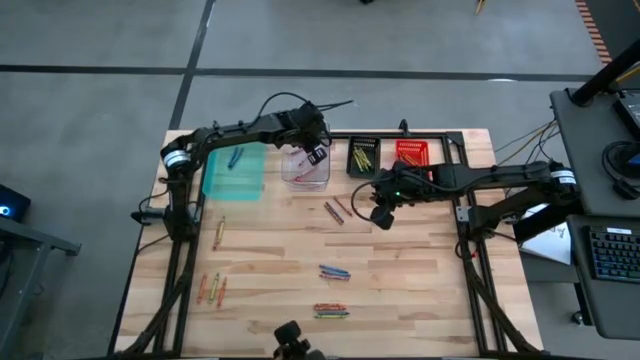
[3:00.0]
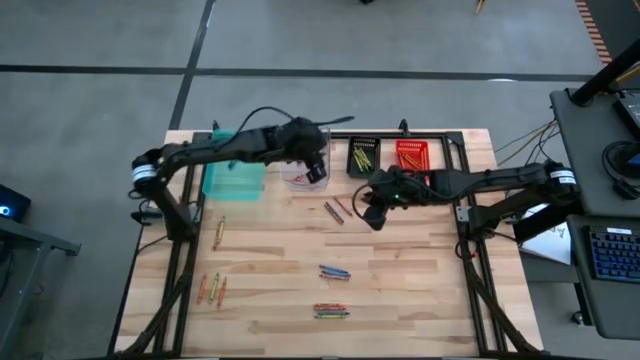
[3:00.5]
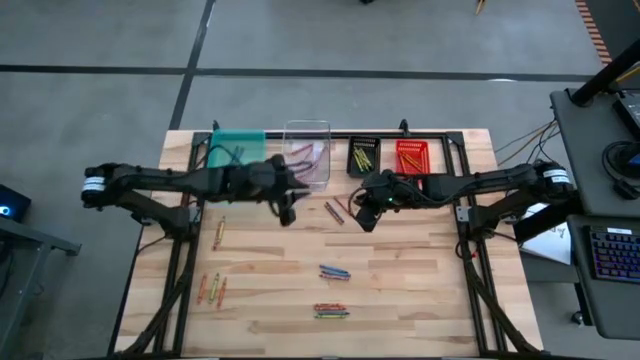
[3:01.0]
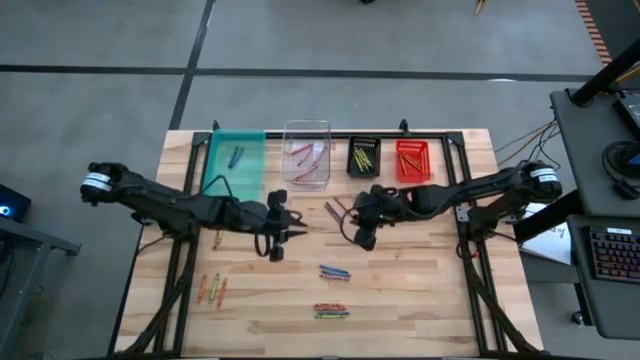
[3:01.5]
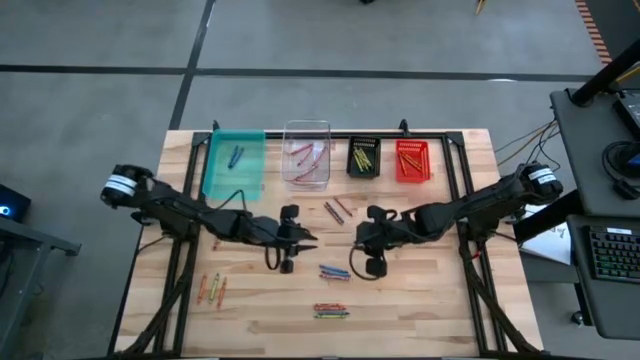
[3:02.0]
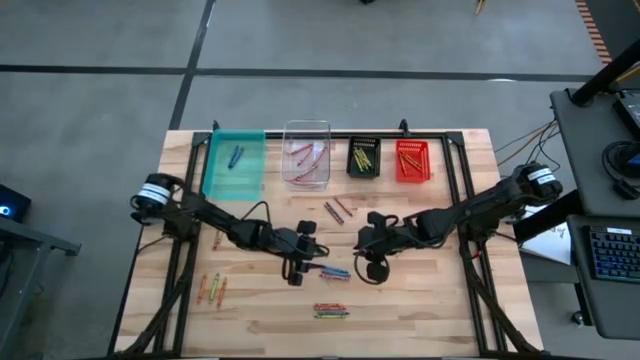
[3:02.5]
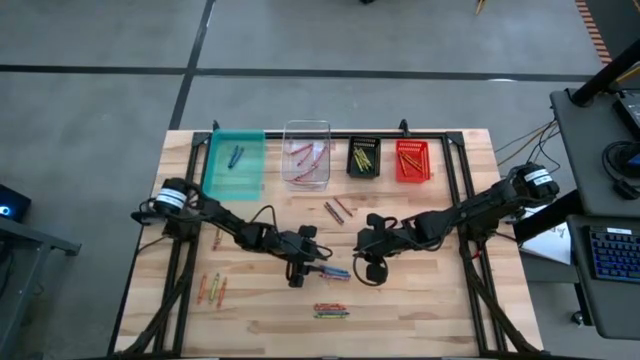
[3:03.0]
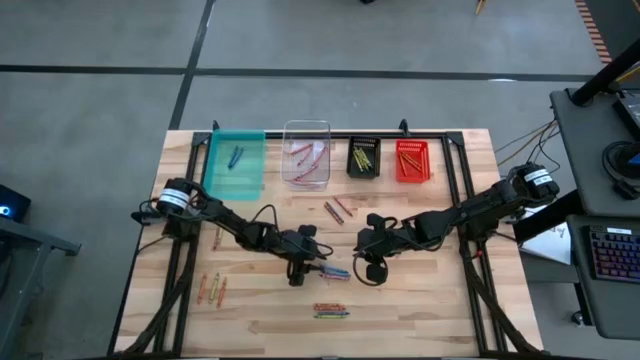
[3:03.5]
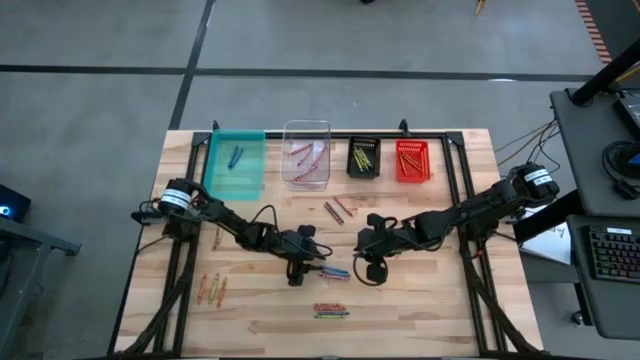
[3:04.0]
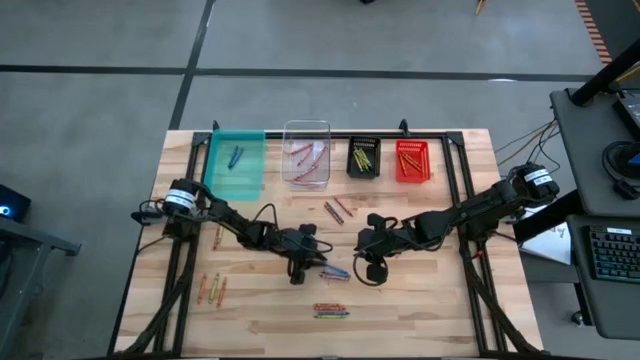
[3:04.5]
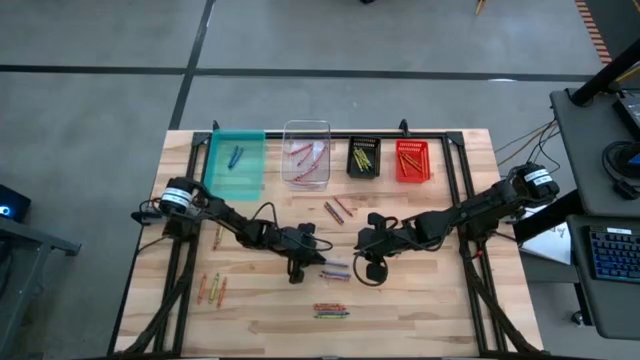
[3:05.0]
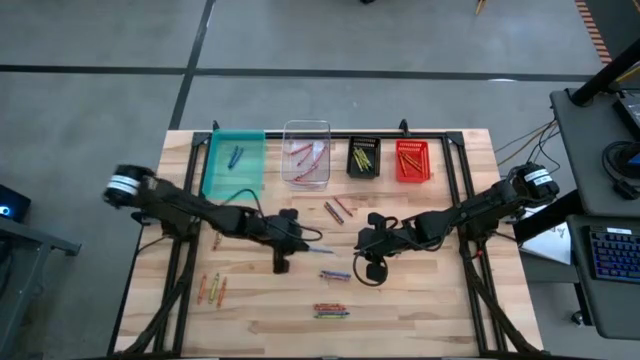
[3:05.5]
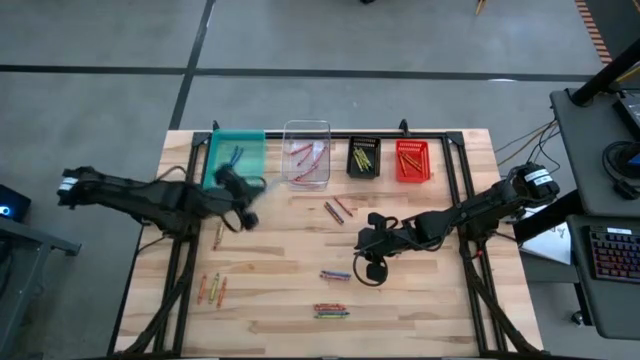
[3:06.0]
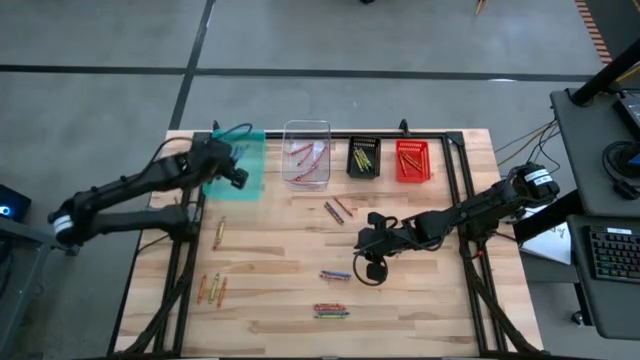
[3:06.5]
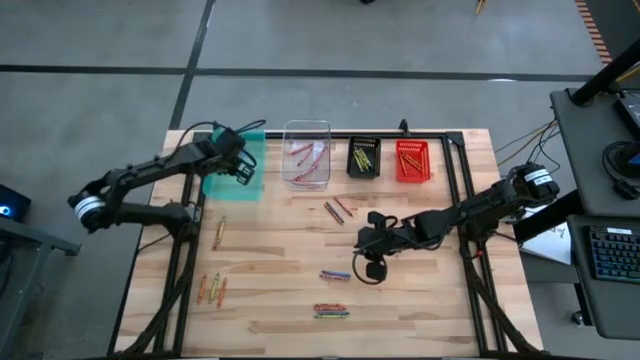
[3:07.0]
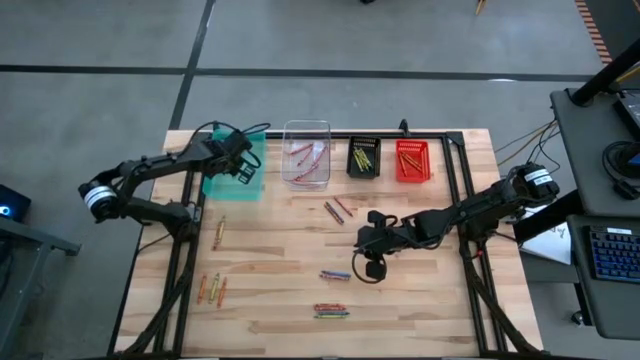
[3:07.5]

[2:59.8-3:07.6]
Task: Sort crayons
Put the blue crayon into the green transparent bin

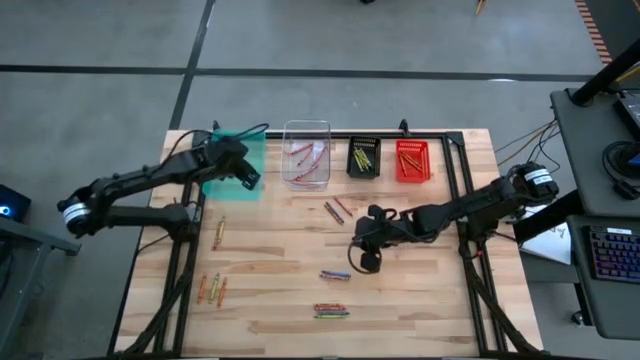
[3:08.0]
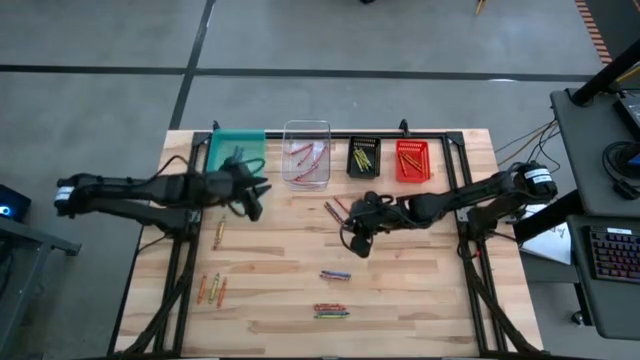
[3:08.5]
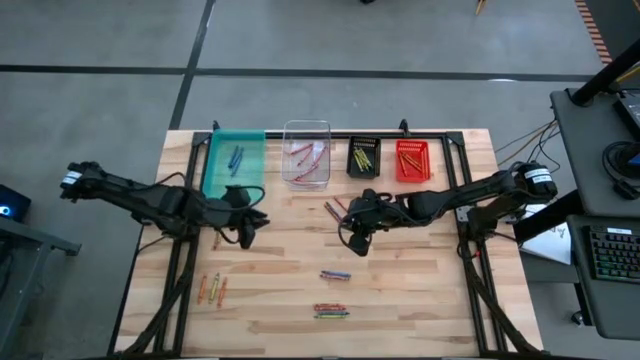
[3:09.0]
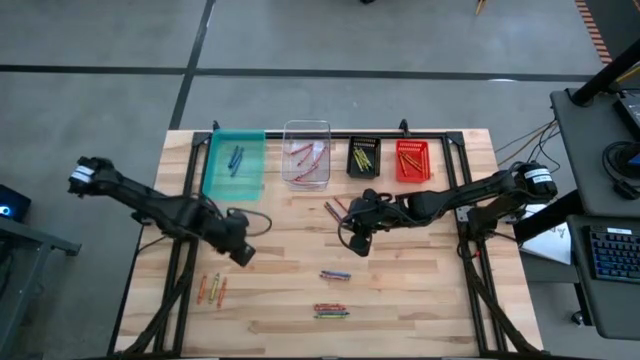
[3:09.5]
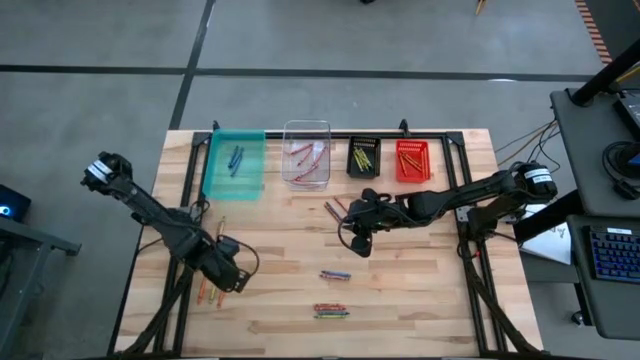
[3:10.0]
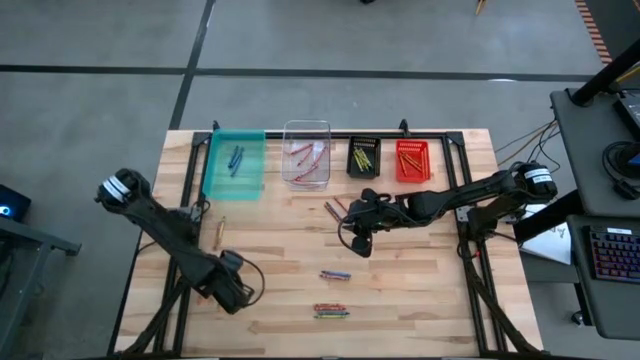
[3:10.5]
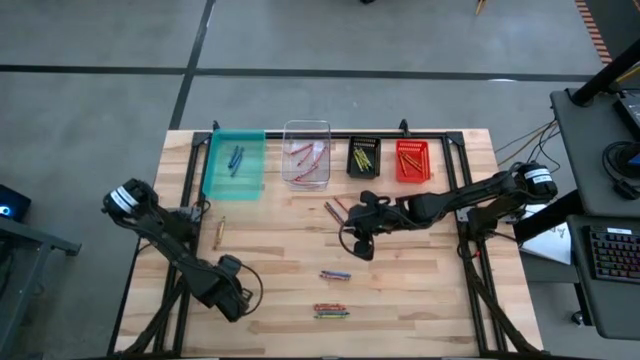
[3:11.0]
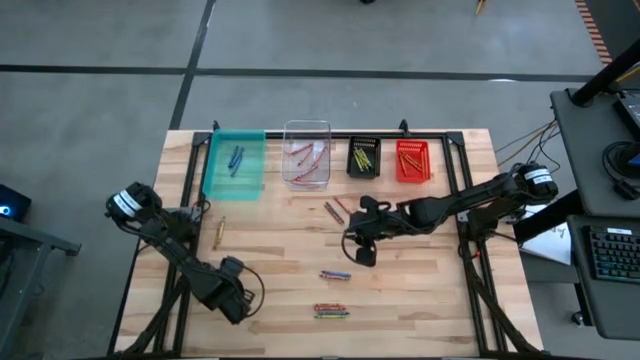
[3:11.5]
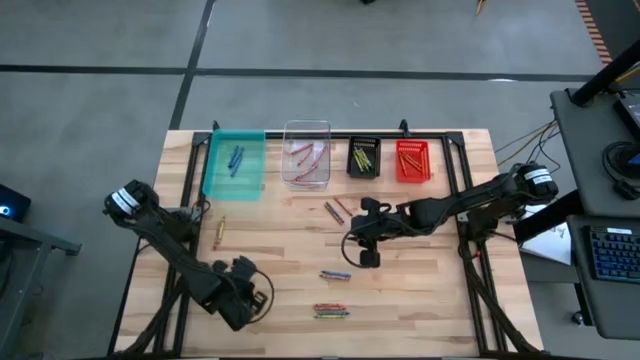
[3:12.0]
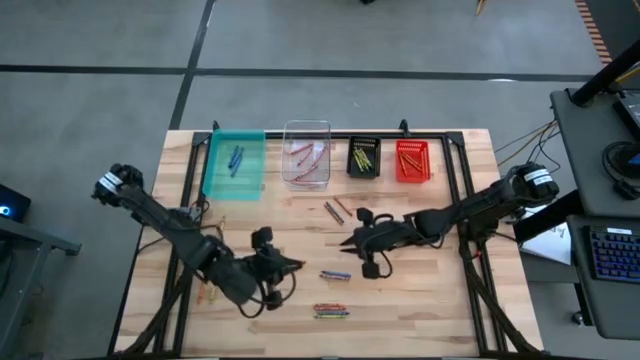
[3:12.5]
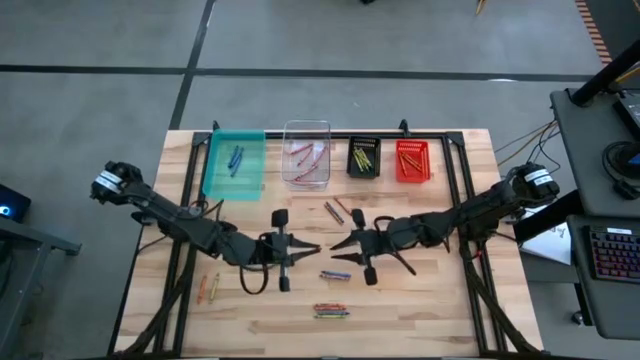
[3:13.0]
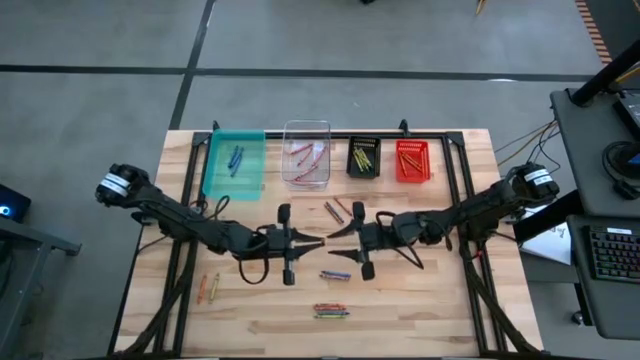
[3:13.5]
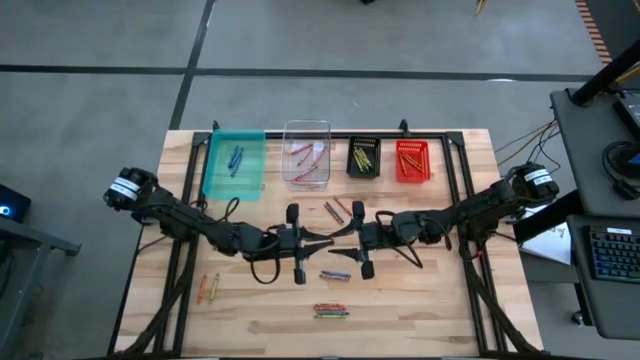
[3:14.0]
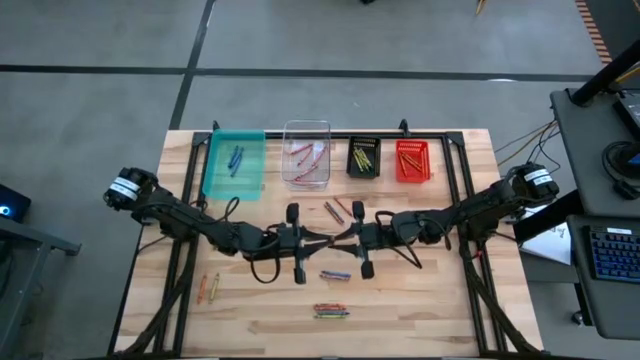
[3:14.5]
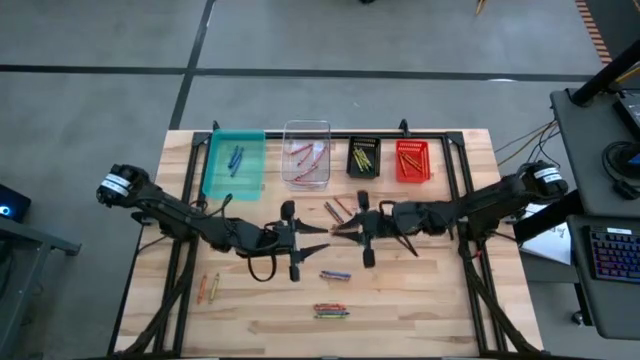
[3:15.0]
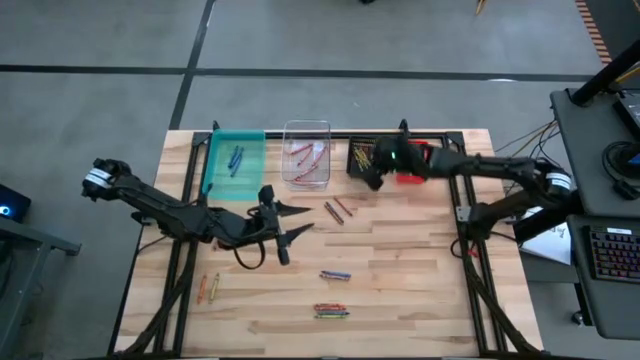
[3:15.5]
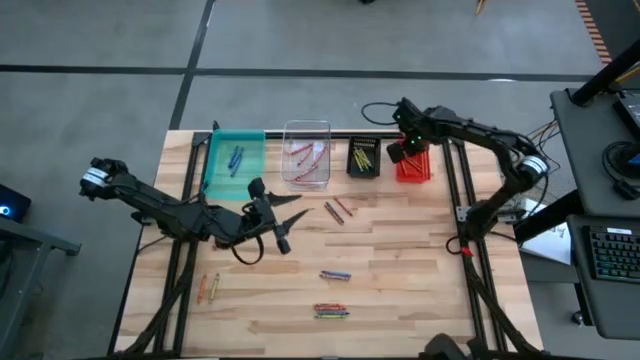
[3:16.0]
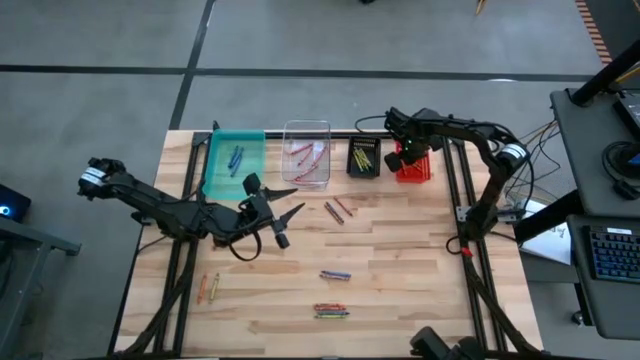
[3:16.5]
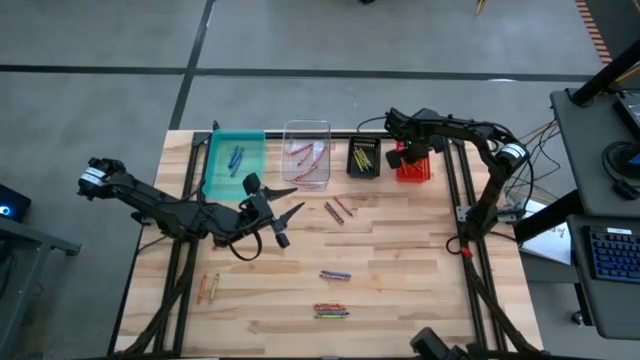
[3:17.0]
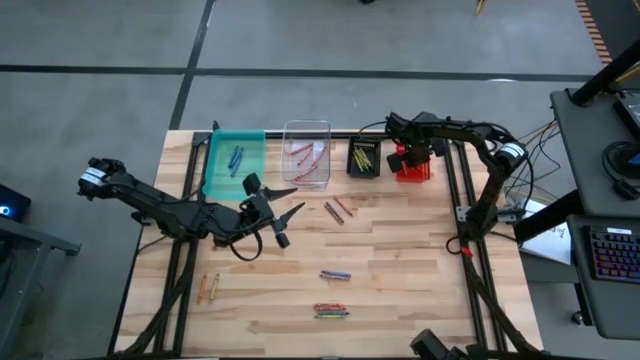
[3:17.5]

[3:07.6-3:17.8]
Put the orange crayon into the orange bin

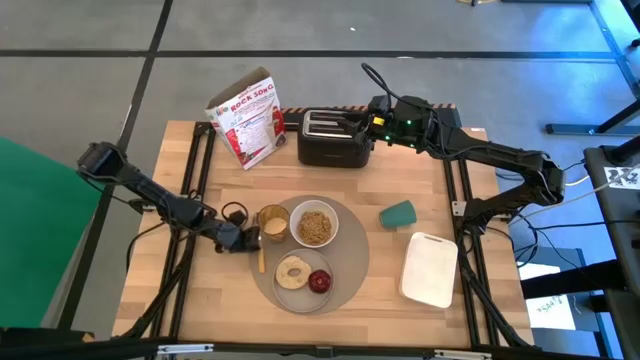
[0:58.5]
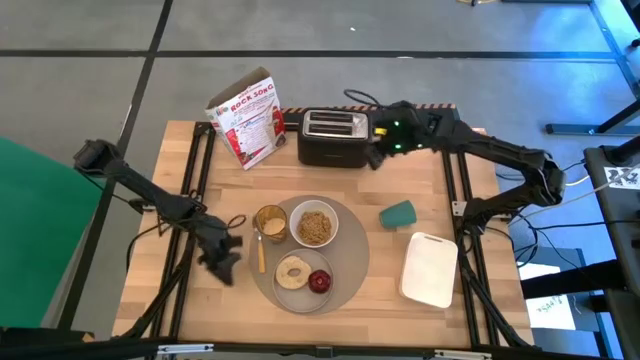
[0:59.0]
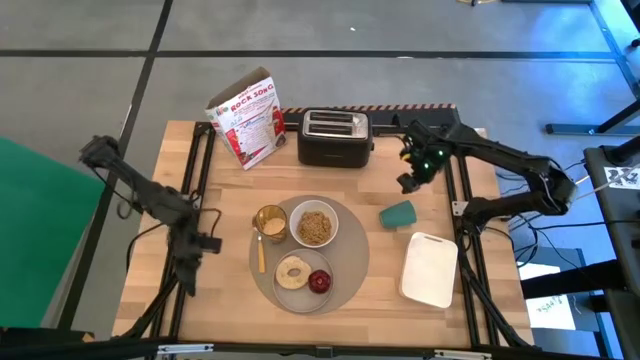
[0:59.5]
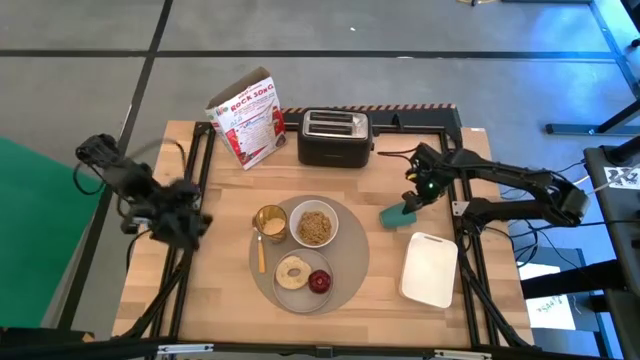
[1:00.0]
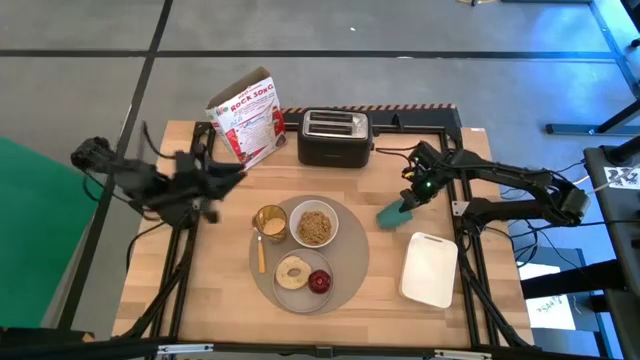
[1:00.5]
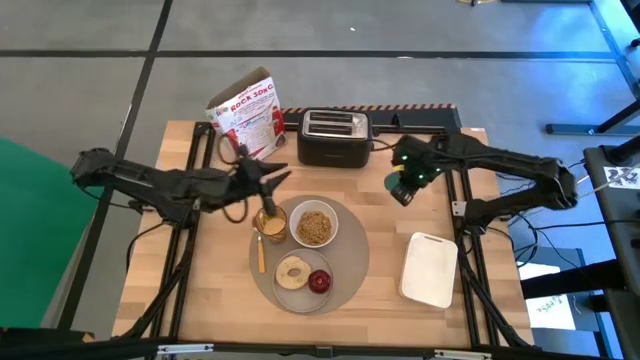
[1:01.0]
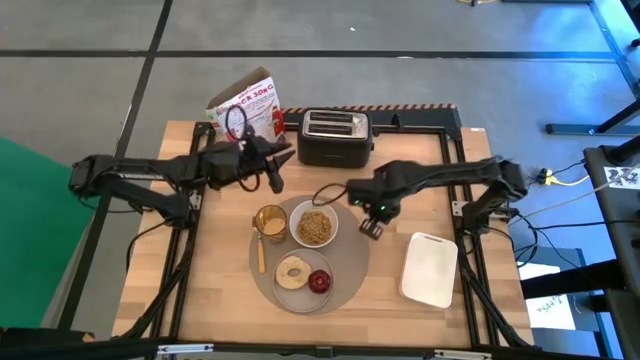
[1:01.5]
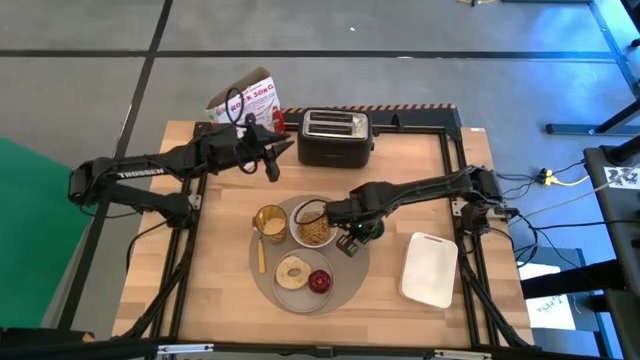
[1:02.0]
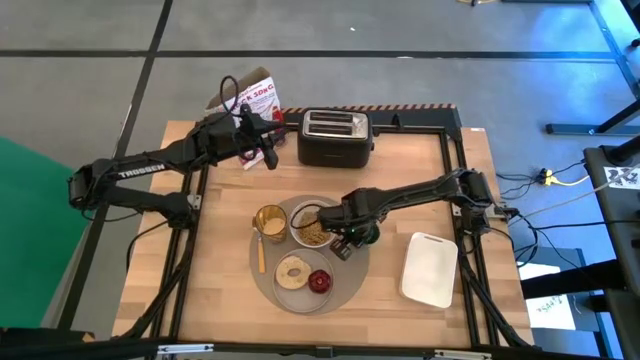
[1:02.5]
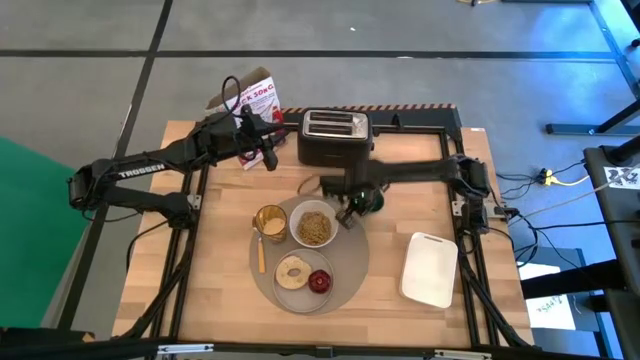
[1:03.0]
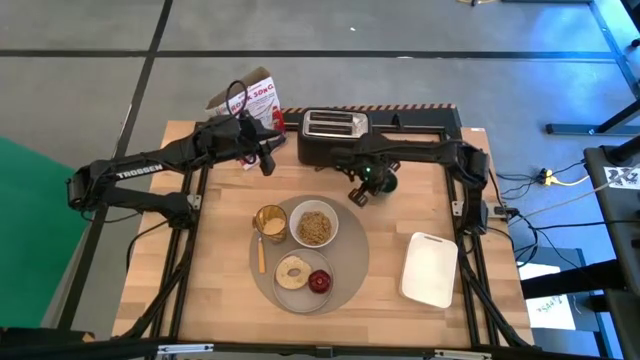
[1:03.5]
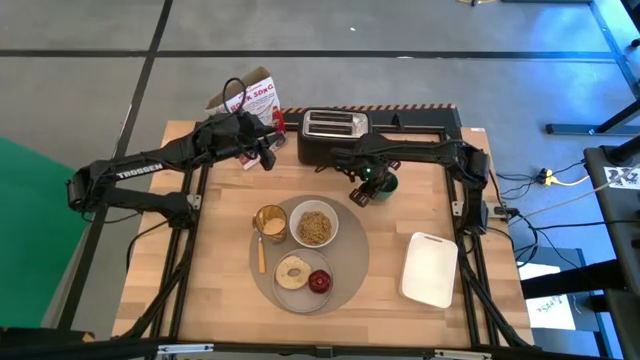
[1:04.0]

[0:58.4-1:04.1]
Task: Arrange a breakfast setting
Adjust the green cup
